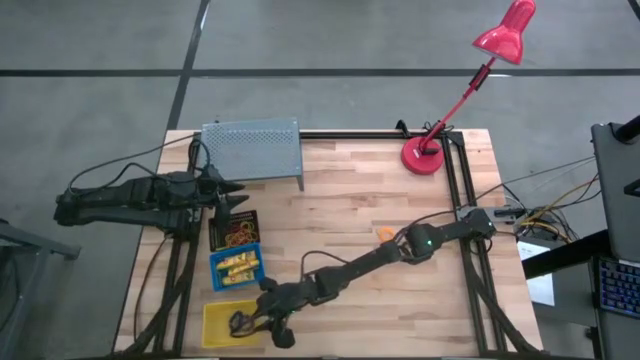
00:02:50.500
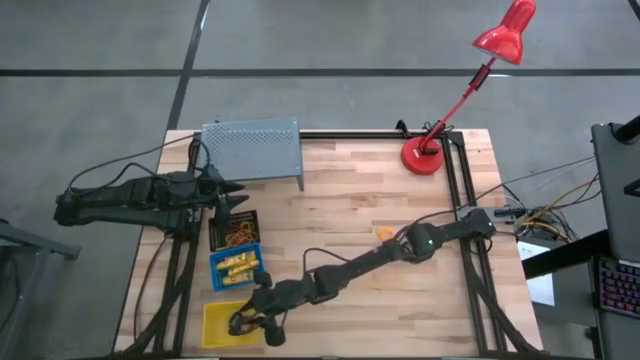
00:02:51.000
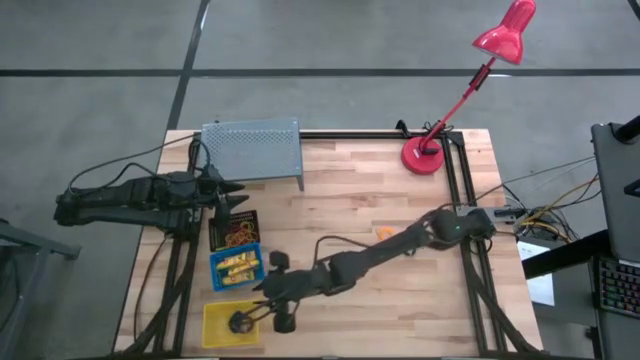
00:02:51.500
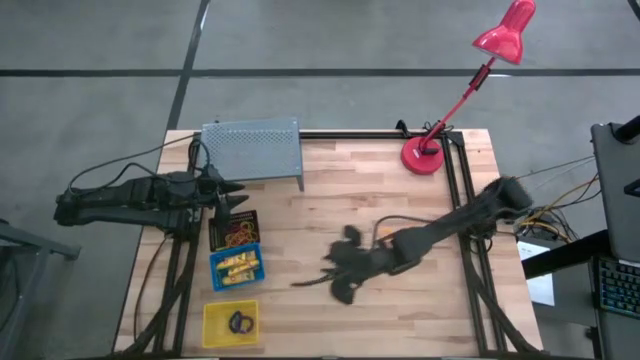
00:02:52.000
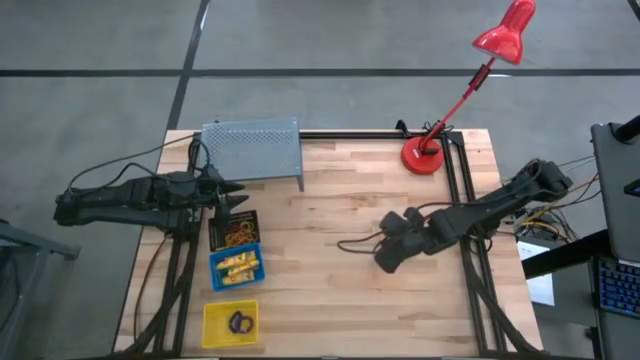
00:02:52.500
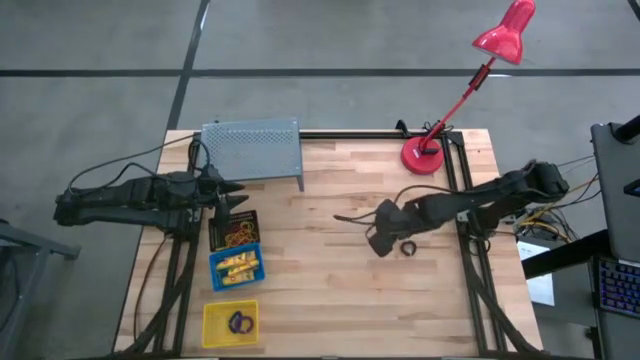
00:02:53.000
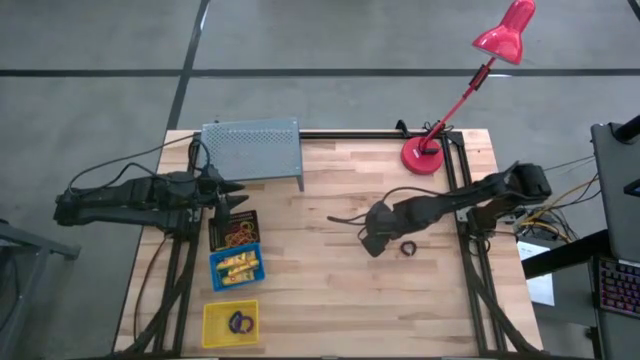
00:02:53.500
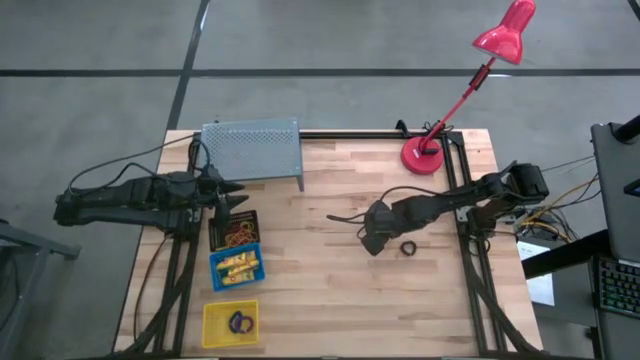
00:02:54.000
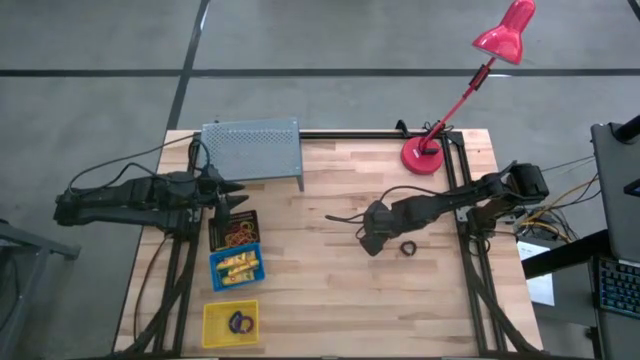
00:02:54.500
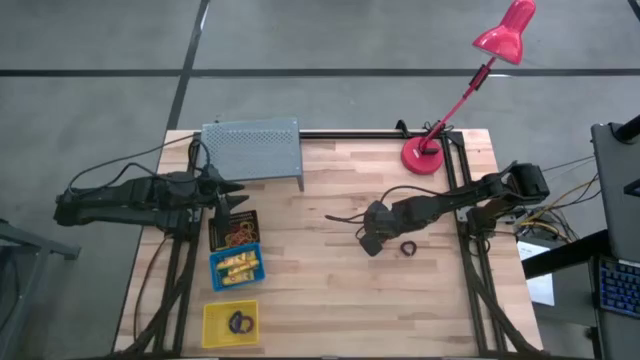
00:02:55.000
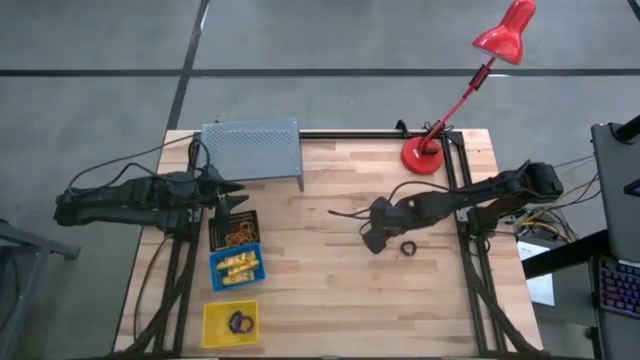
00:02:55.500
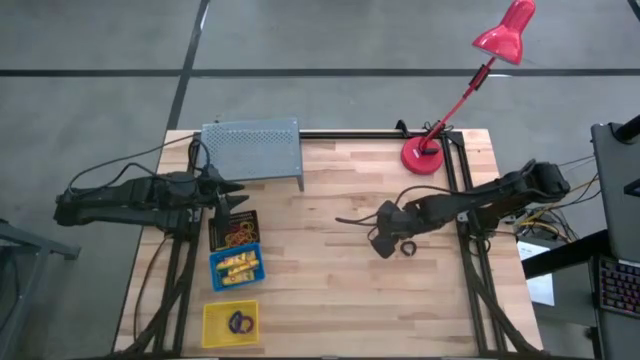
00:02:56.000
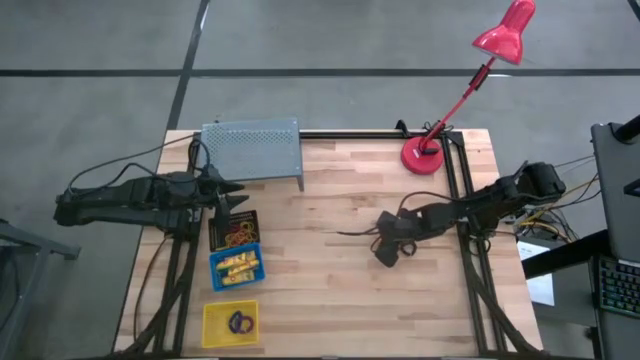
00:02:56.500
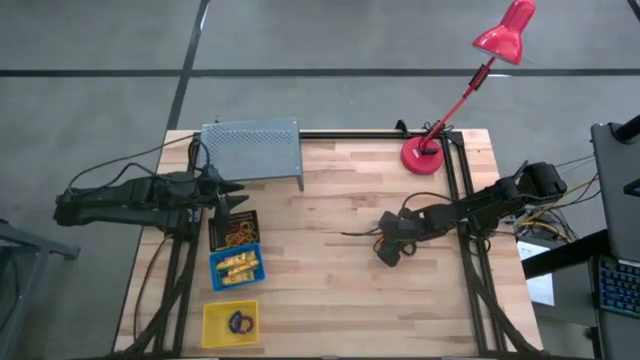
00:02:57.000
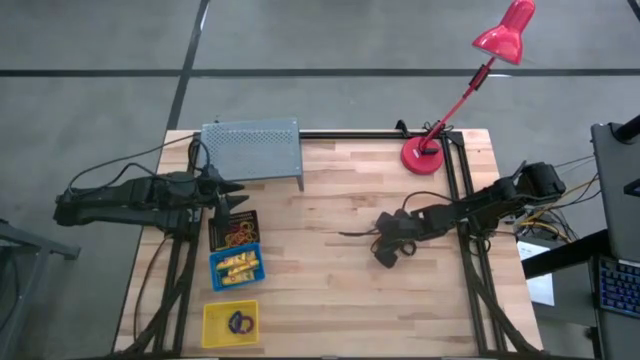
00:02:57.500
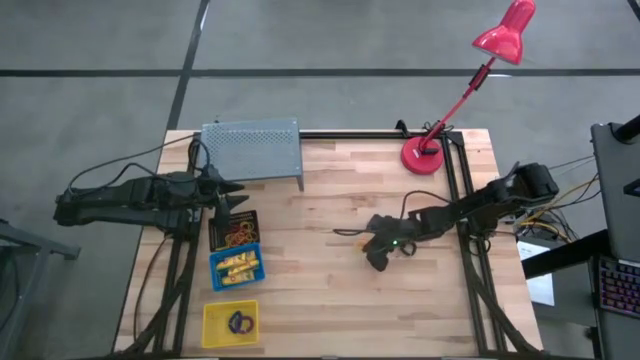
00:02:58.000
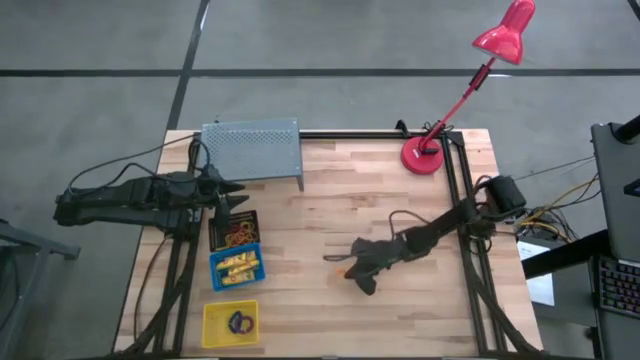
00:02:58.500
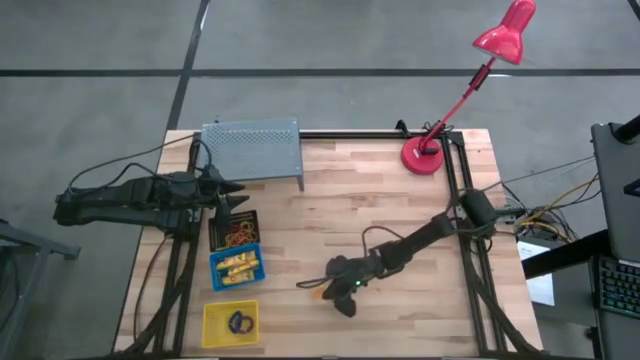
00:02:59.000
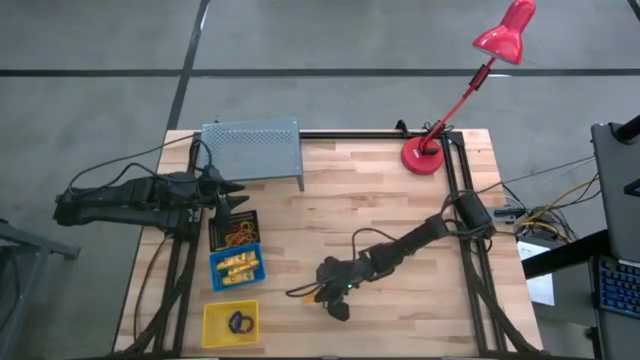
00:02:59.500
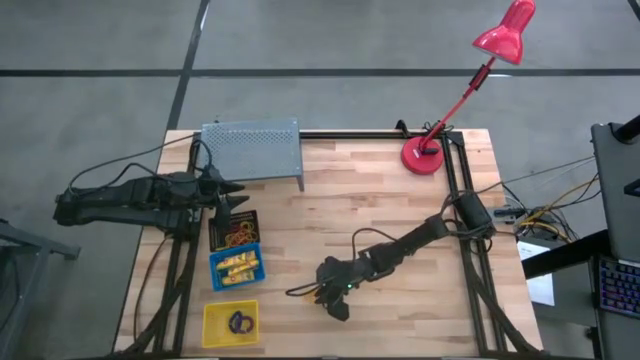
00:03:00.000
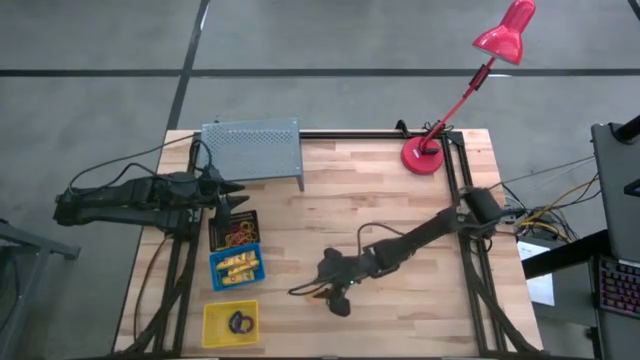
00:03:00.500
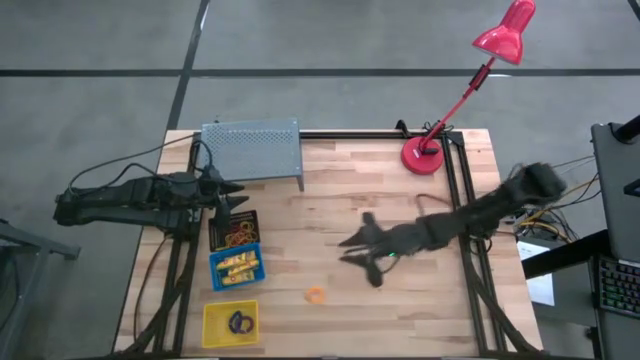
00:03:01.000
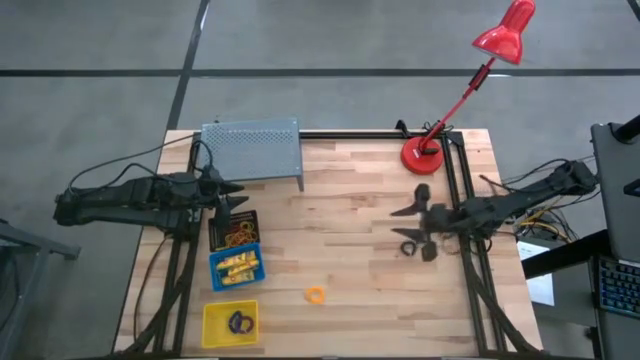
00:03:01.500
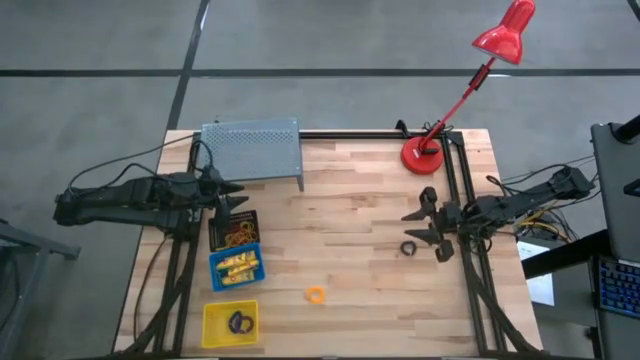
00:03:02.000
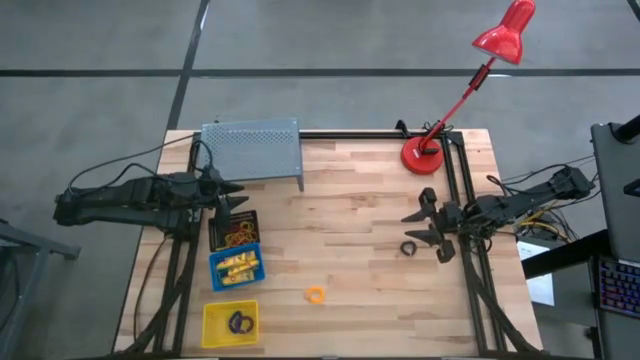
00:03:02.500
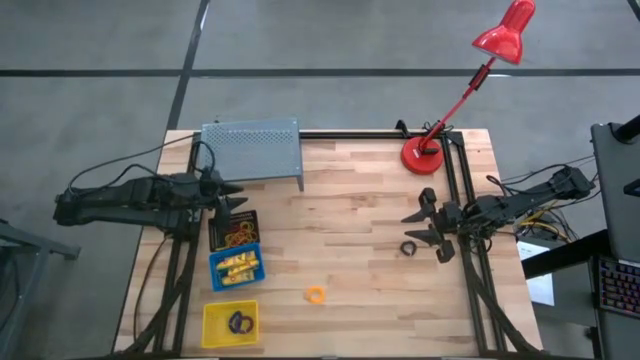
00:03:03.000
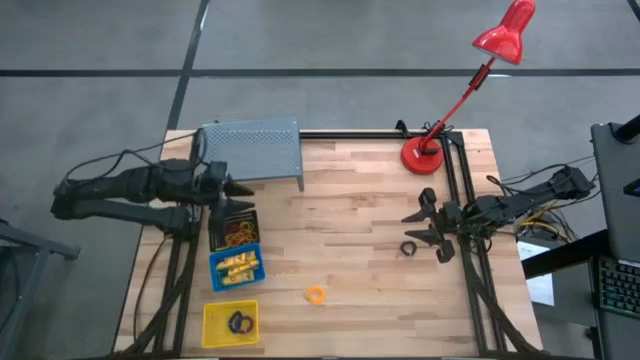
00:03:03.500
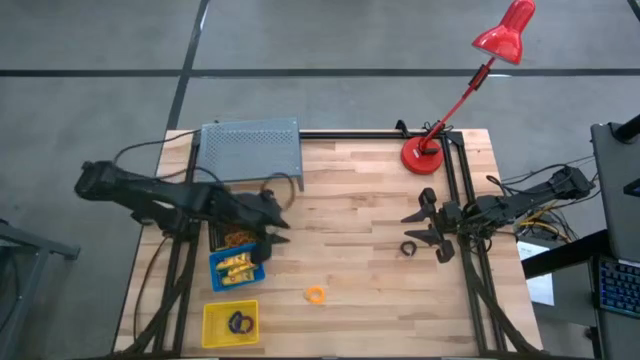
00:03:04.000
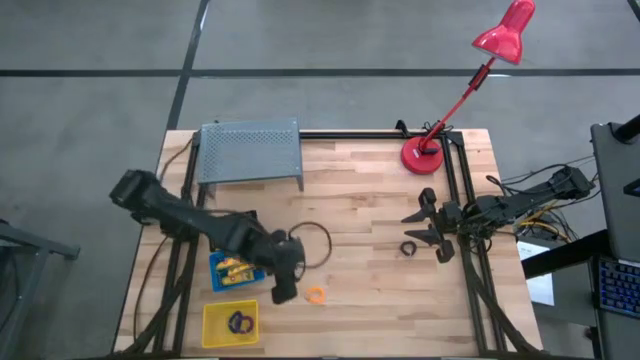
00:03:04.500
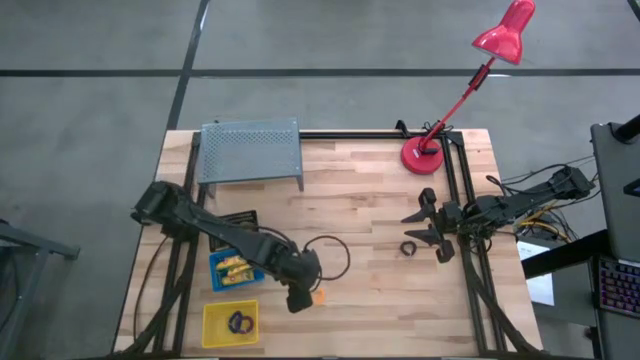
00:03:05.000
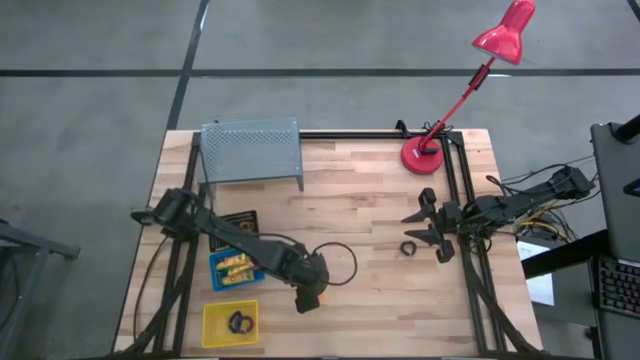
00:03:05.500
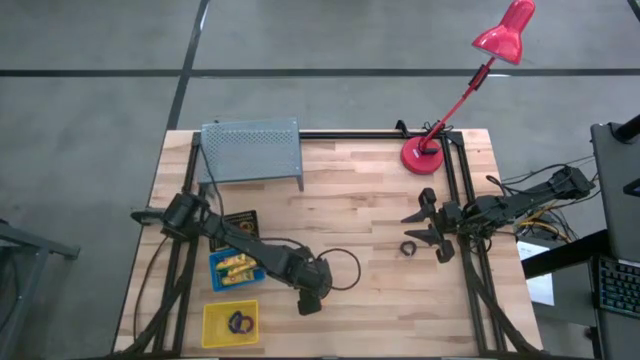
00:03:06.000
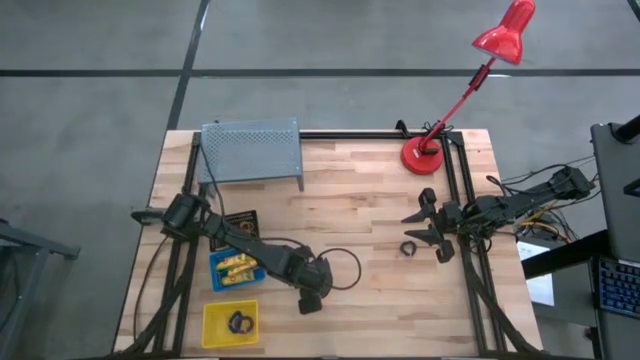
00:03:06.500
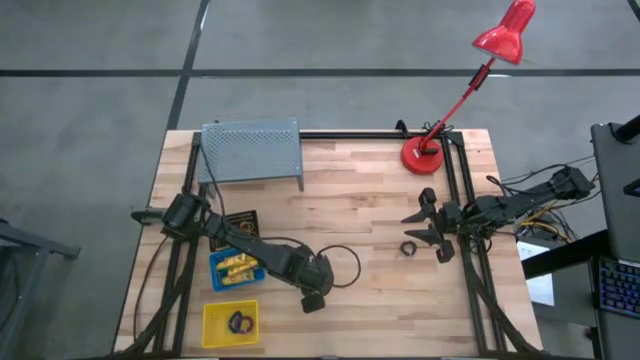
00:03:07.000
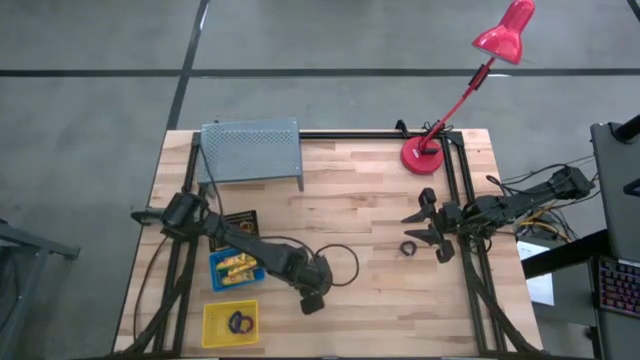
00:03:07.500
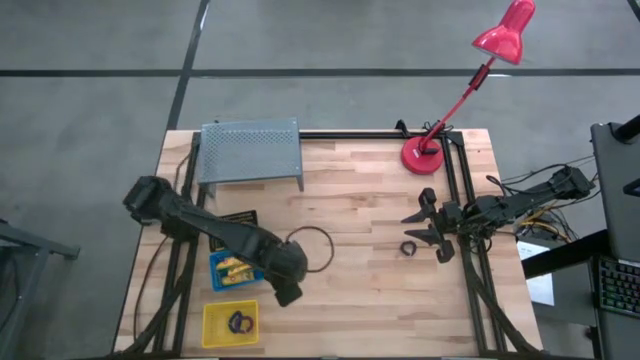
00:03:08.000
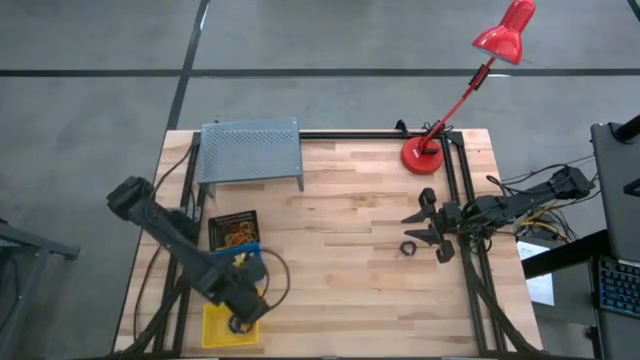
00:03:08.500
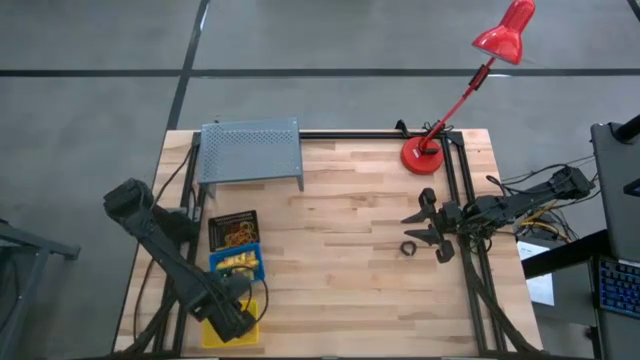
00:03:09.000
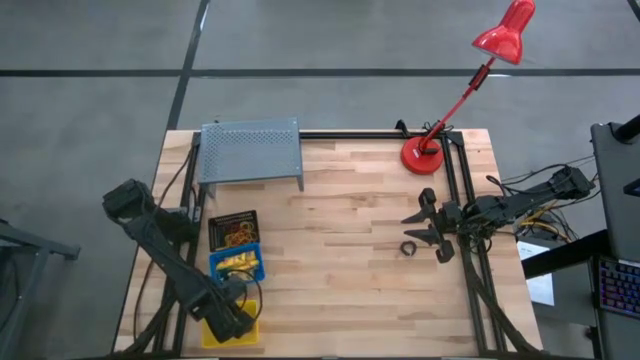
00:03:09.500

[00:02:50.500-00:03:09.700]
Task: Pick & Place Office Desk Supplies
Put the yellow key chain in the yellow bin

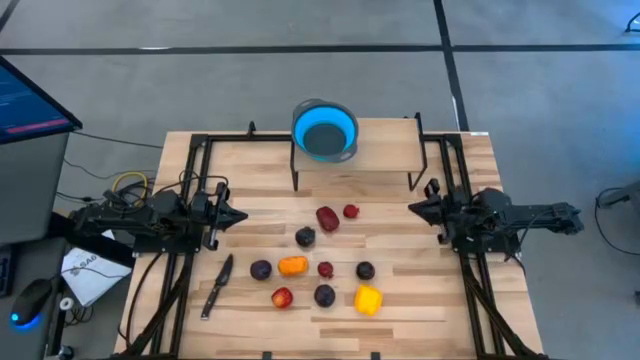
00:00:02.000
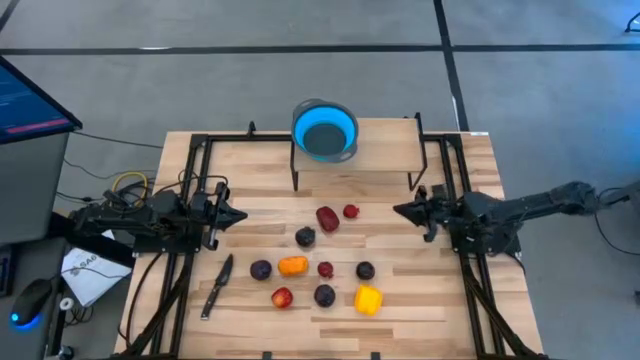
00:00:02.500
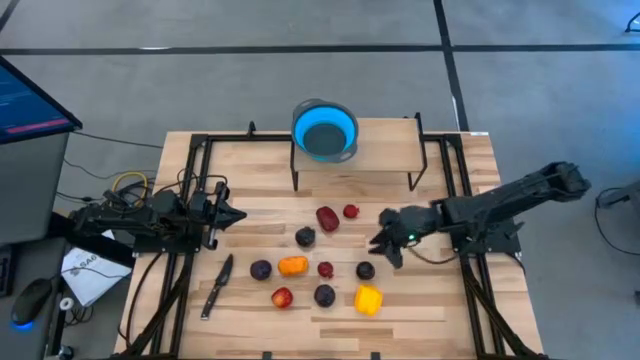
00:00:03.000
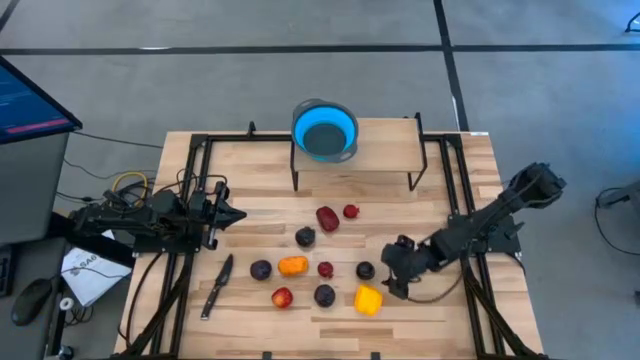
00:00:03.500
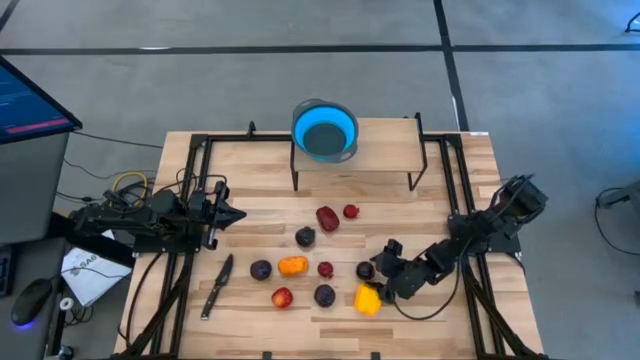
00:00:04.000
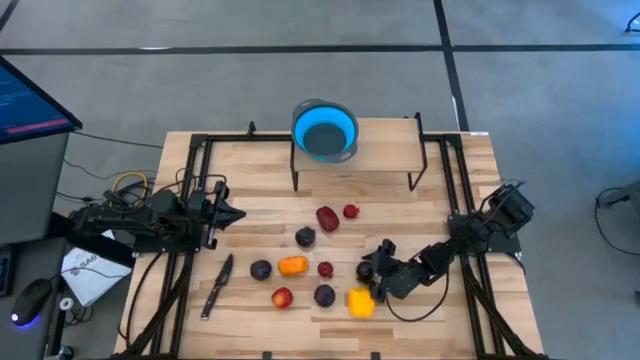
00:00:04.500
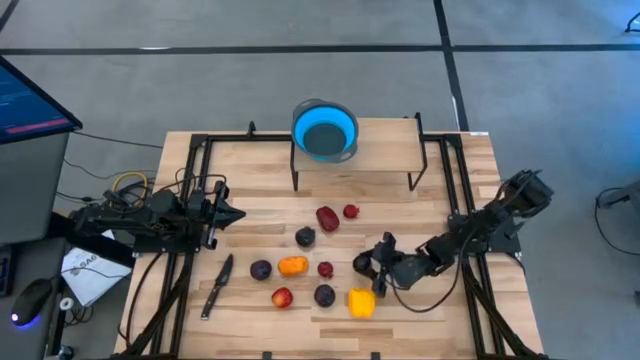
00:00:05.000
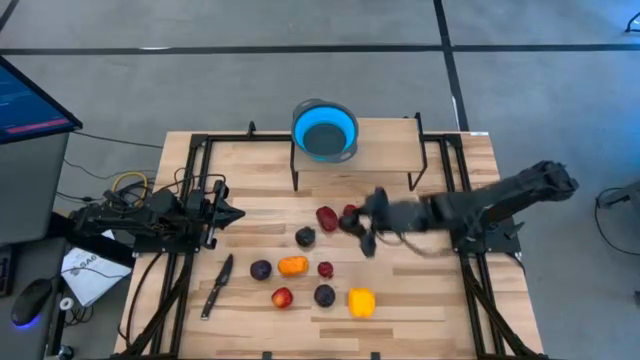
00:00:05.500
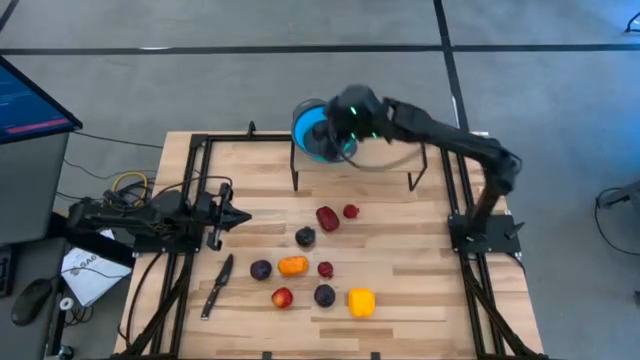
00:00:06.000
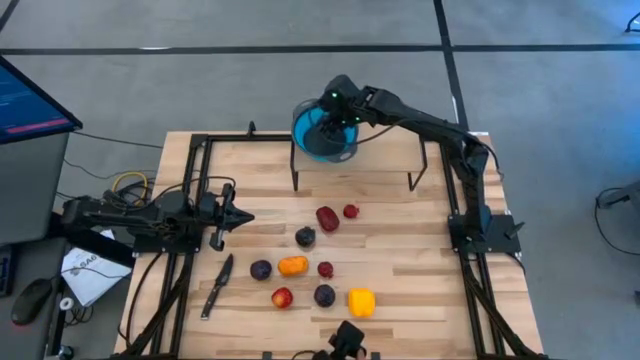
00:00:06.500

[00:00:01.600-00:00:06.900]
Task: Pick & Place Fruit
Put the right purple plum into the blue strainer bowl on the shelf
